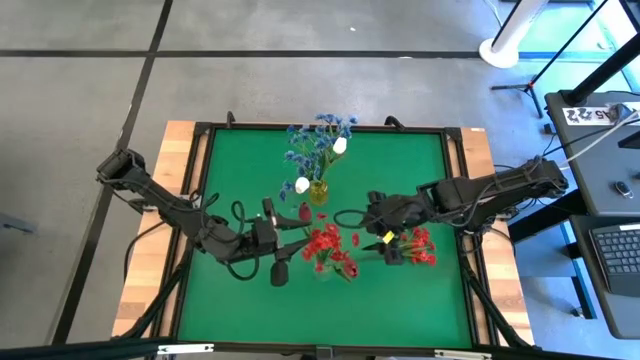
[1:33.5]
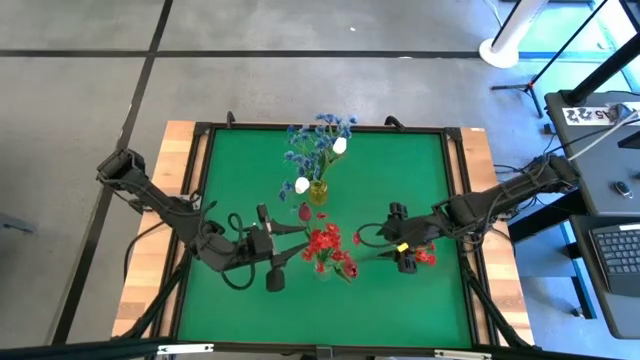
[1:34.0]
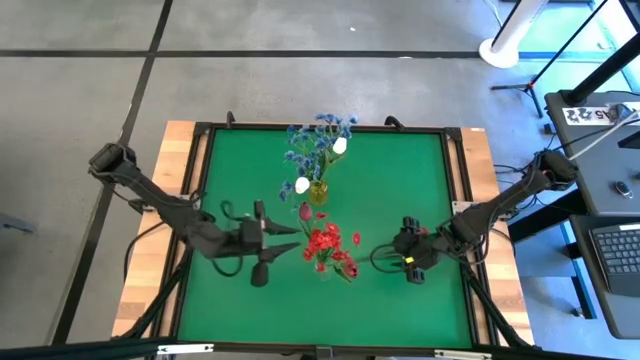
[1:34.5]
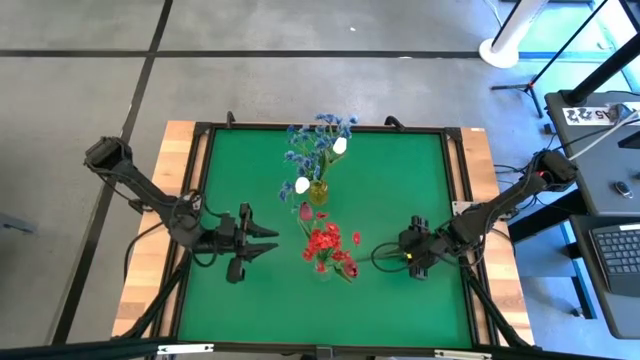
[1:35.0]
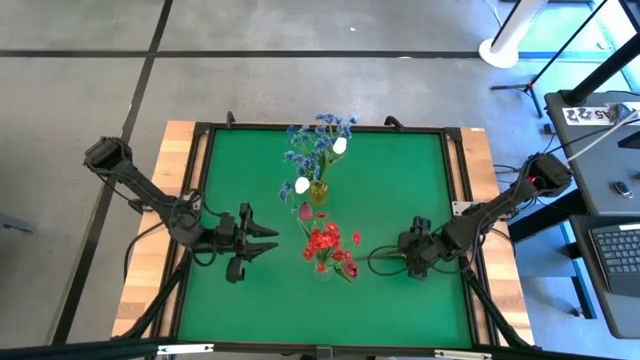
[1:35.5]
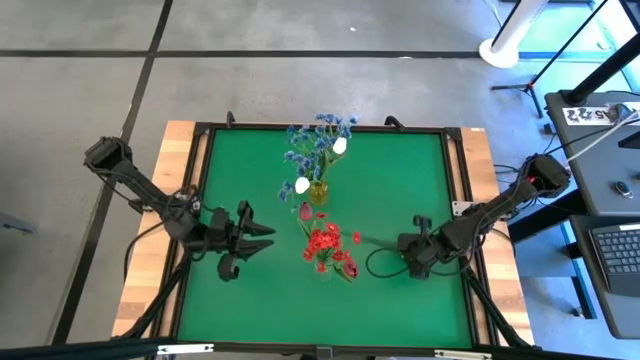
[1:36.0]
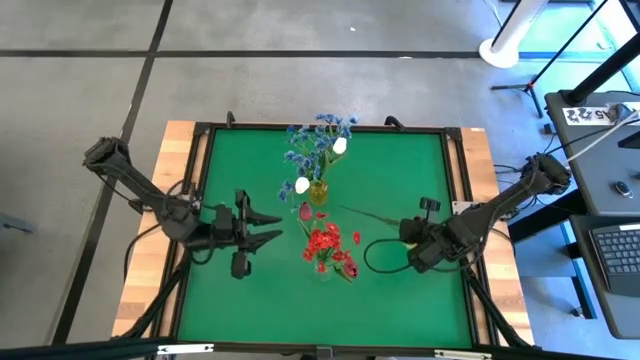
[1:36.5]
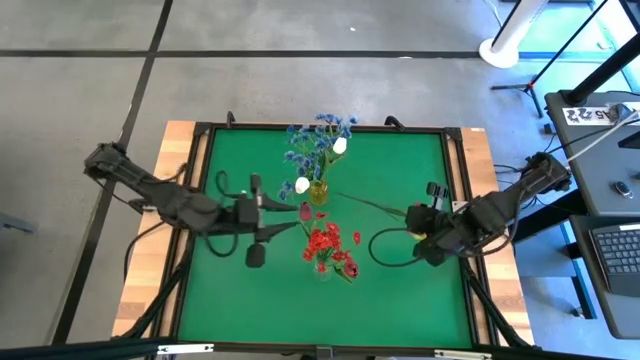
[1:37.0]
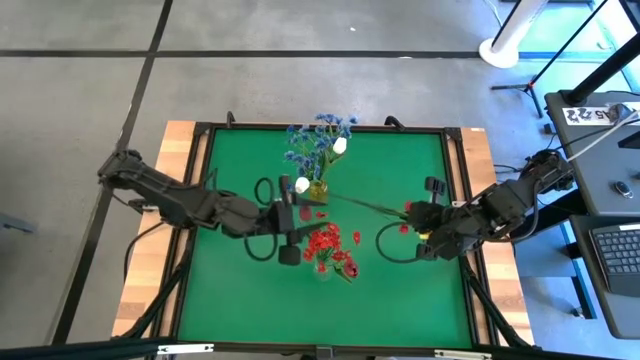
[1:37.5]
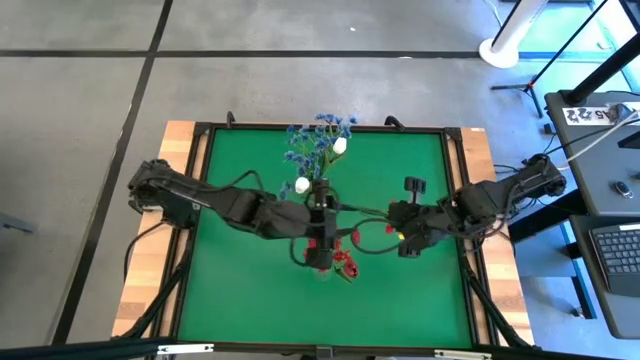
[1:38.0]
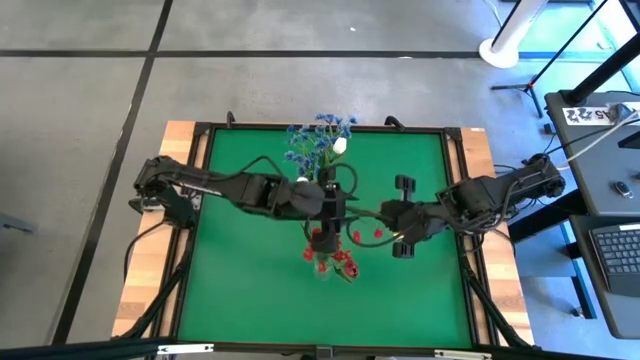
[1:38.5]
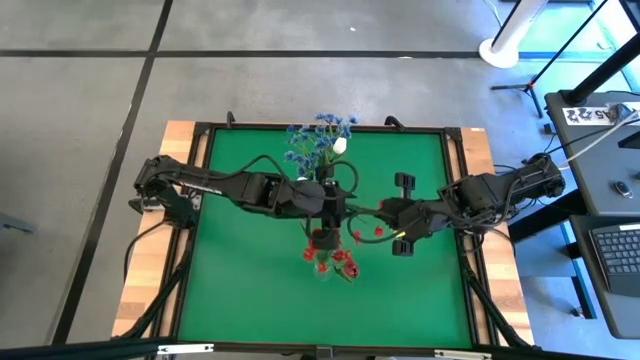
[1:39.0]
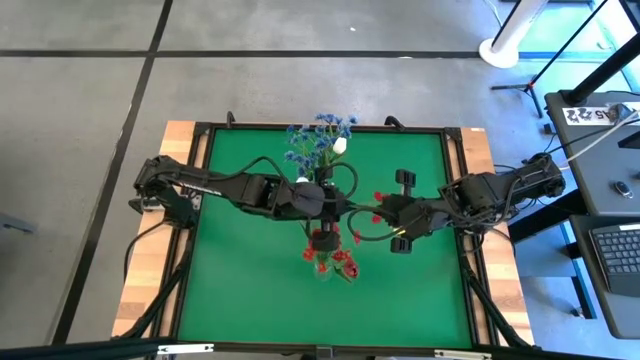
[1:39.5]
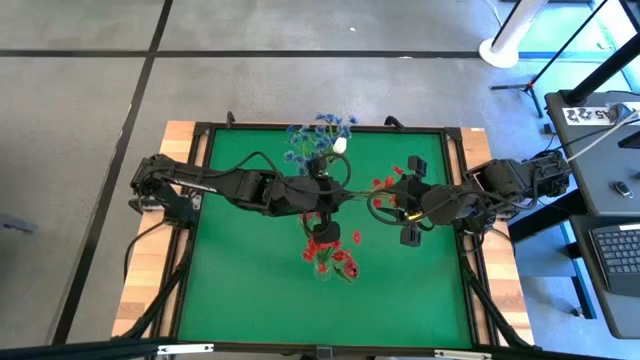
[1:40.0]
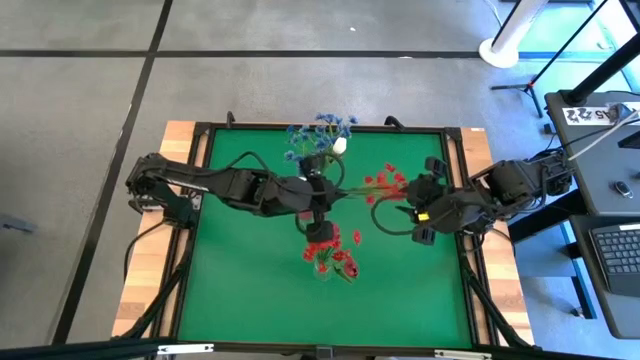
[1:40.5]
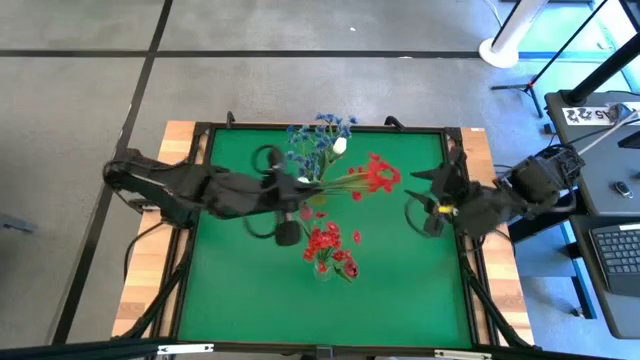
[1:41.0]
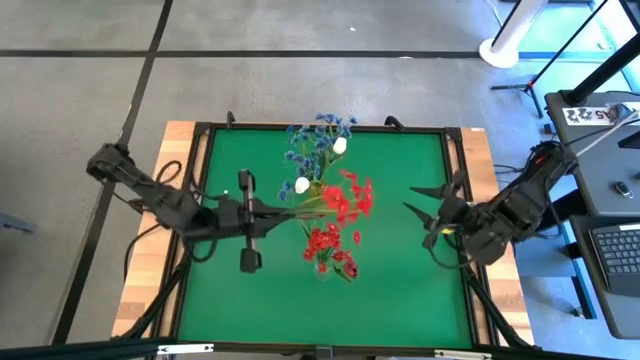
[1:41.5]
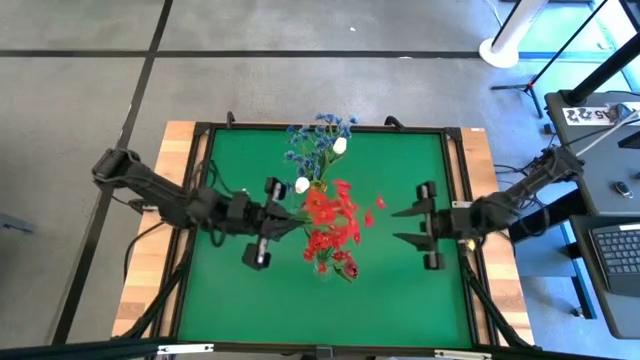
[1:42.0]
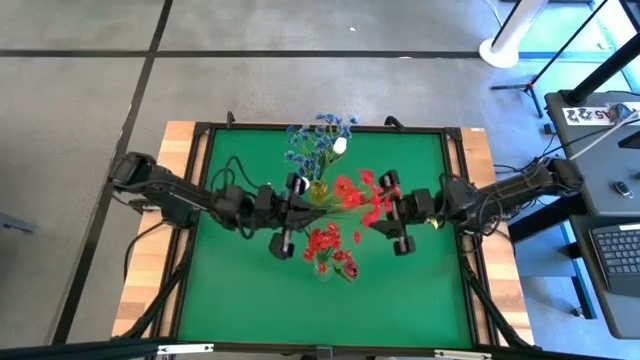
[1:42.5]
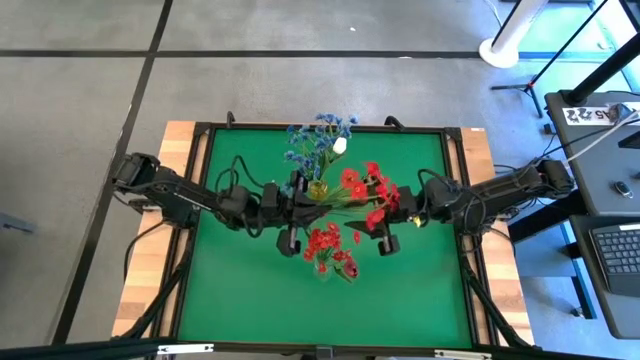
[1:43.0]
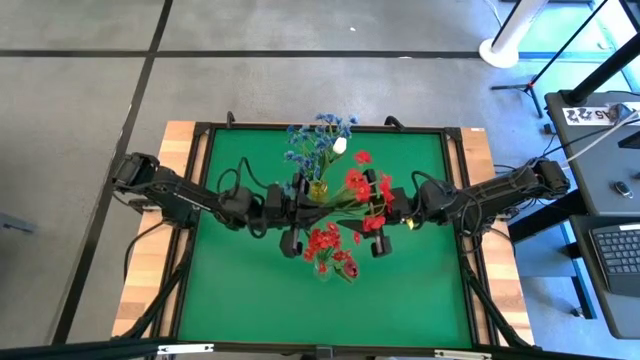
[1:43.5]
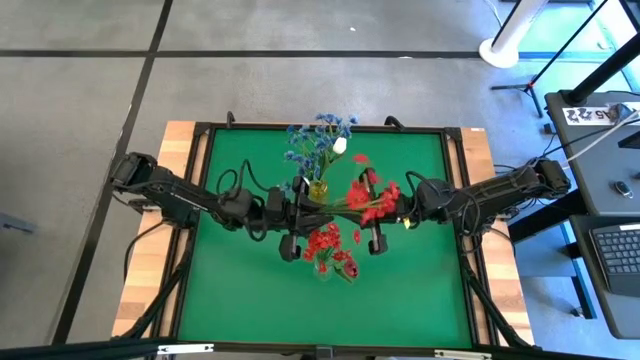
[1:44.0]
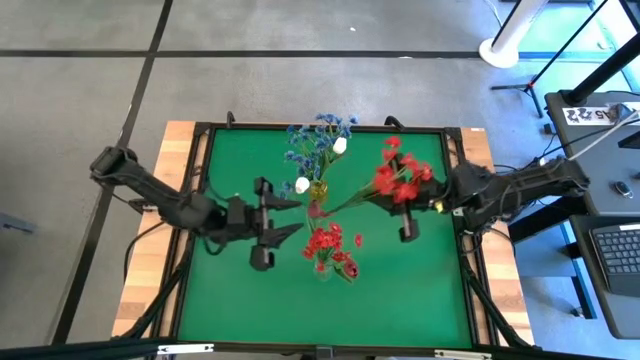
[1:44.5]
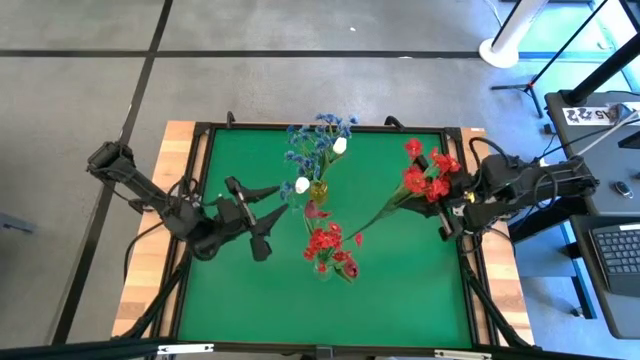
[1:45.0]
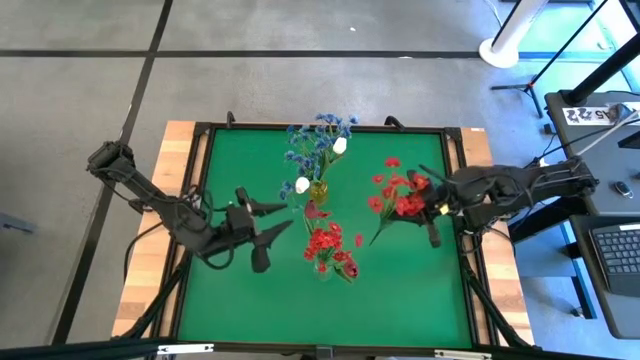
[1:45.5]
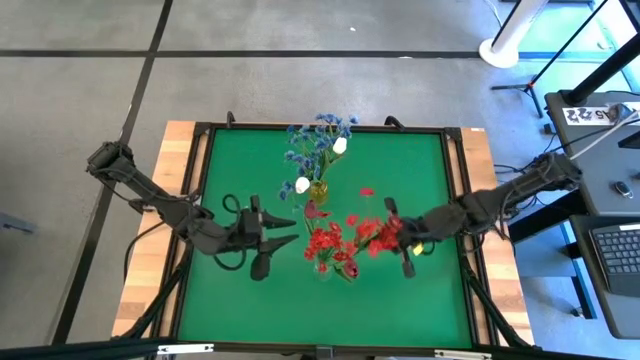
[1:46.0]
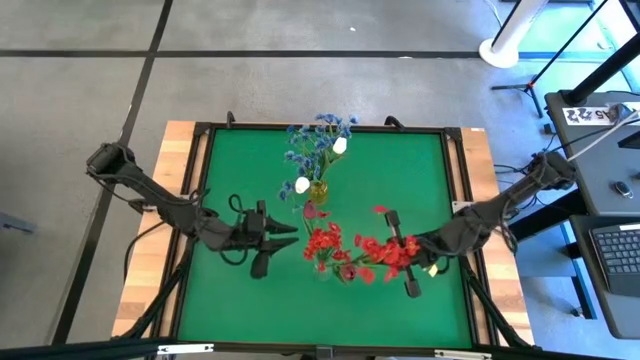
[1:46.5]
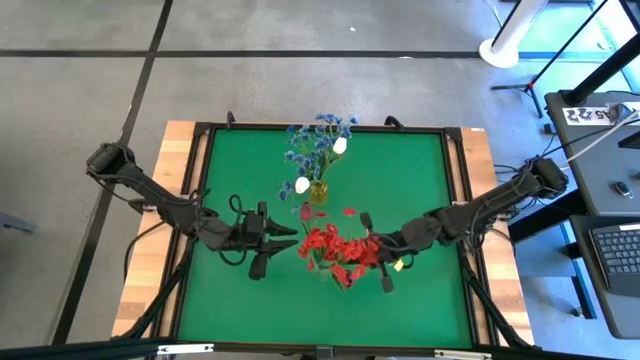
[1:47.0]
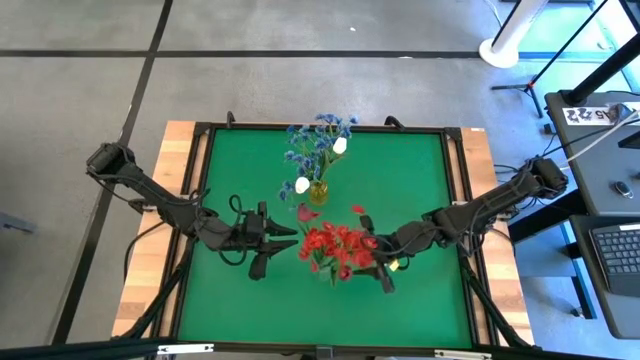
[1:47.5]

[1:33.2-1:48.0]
Task: Sort flowers into vase by color
Put the red flowers into the transparent flower vase

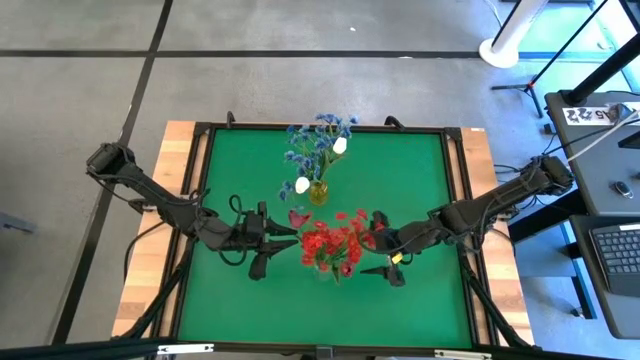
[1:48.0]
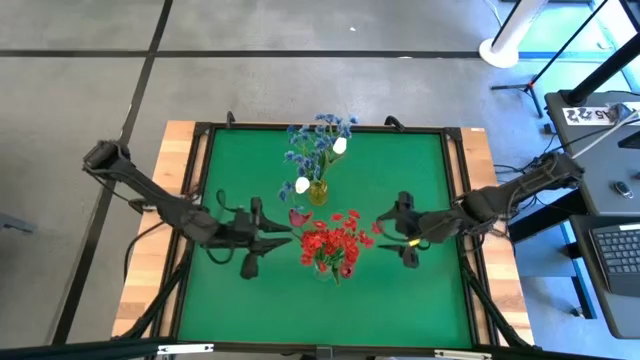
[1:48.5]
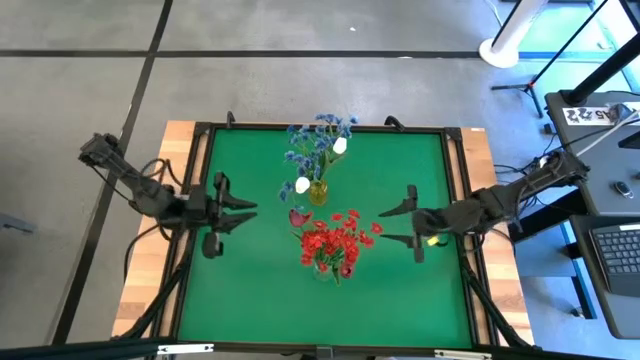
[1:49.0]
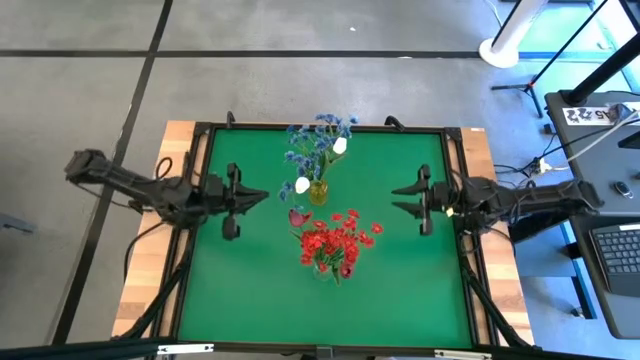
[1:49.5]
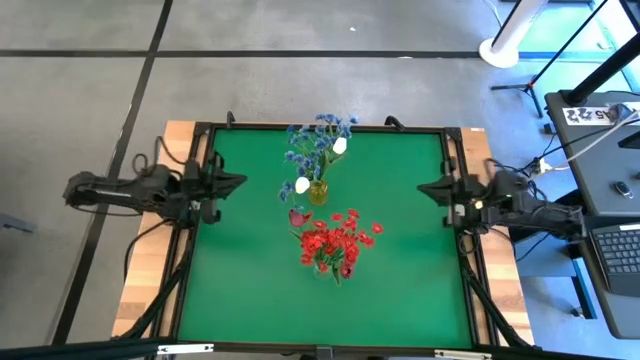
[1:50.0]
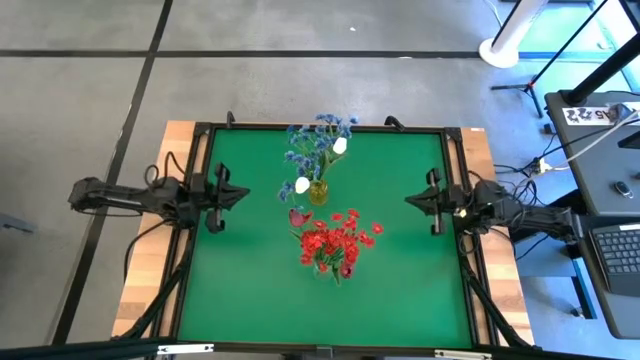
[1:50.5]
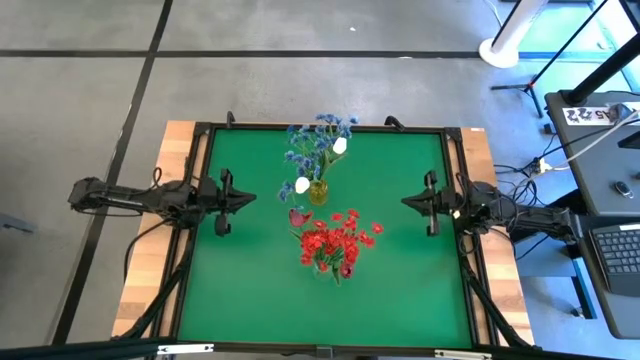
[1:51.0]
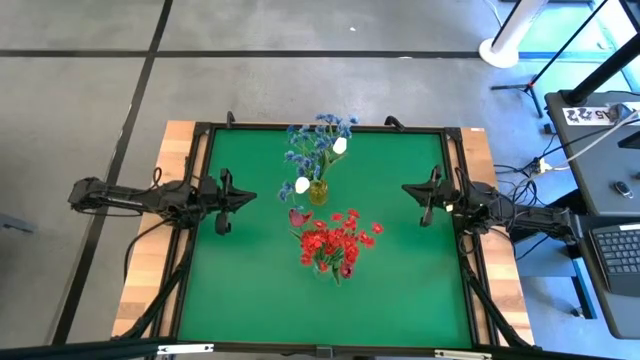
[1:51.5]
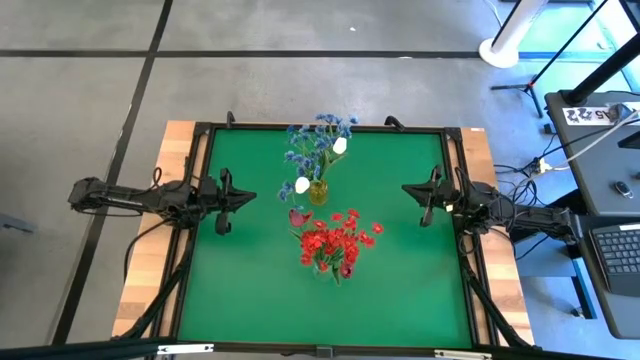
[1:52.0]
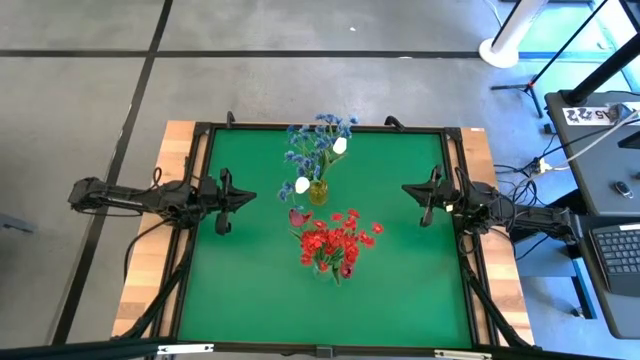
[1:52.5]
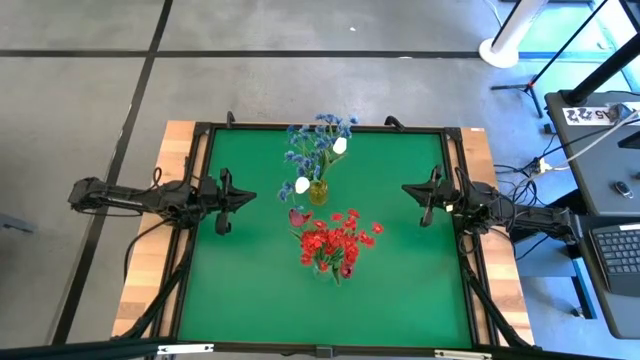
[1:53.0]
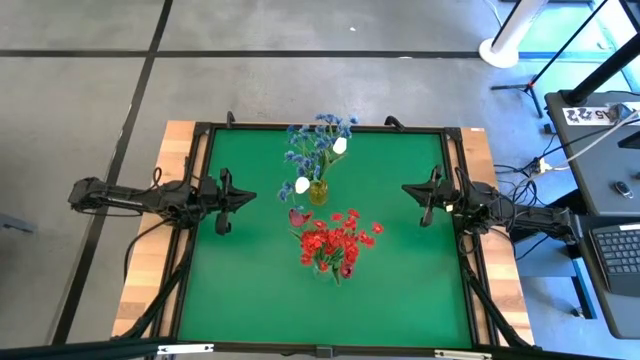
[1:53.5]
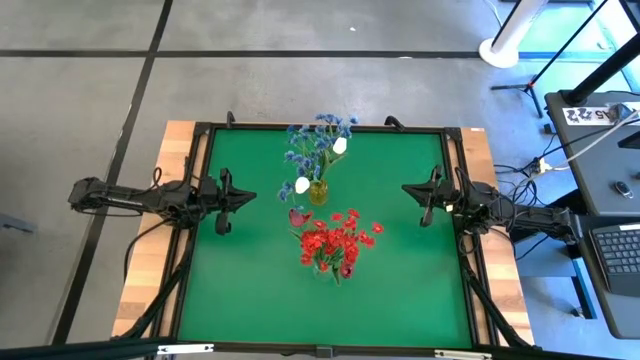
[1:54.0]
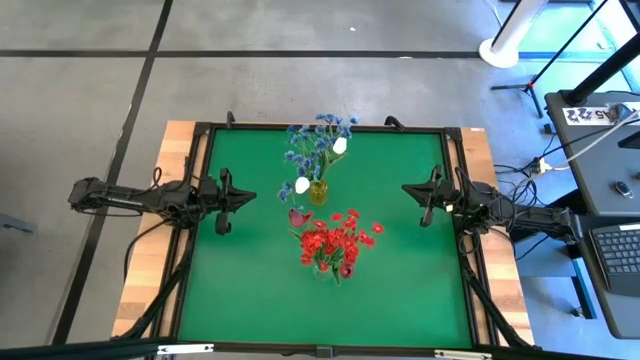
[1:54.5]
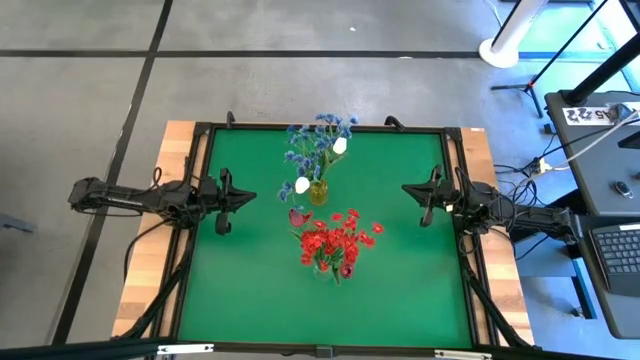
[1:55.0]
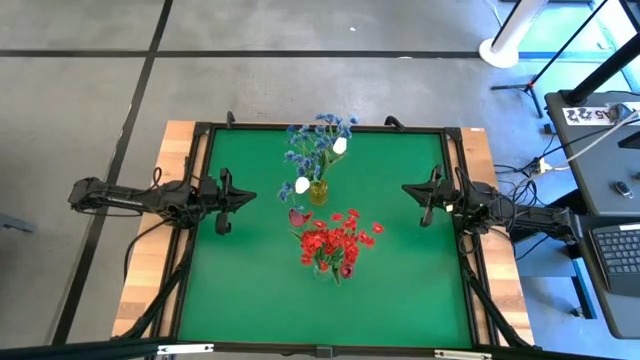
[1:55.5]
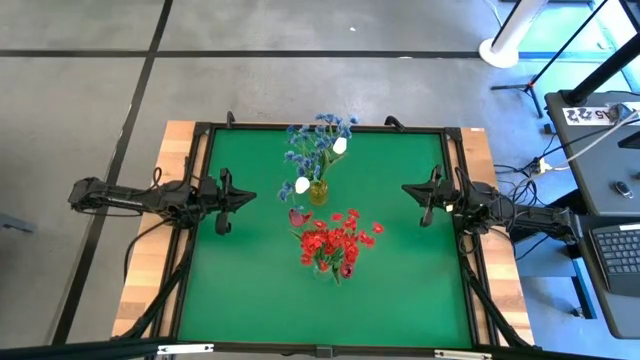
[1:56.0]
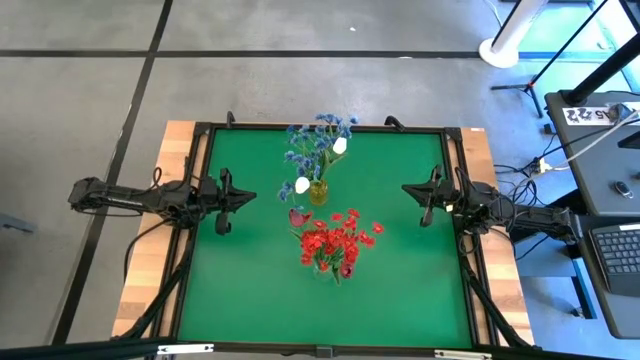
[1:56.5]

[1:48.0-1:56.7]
Return to Home Position
